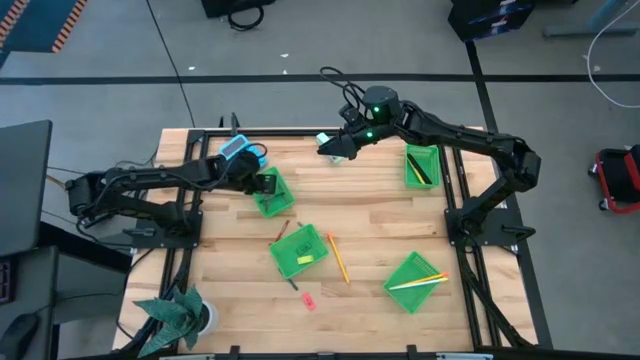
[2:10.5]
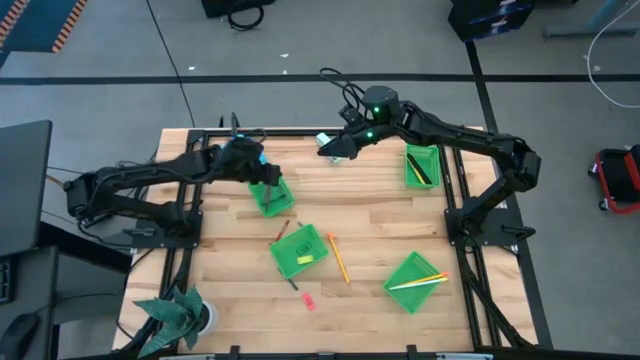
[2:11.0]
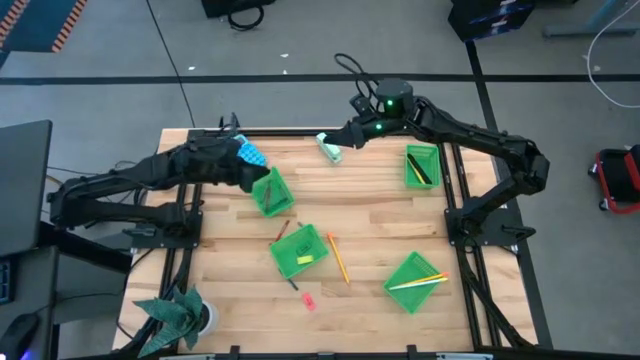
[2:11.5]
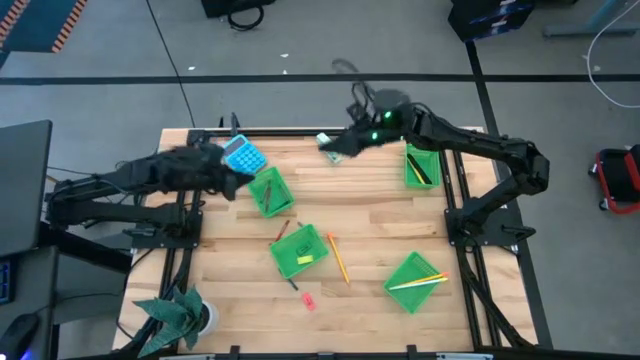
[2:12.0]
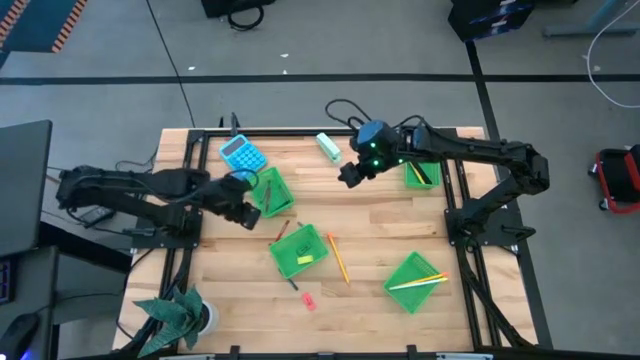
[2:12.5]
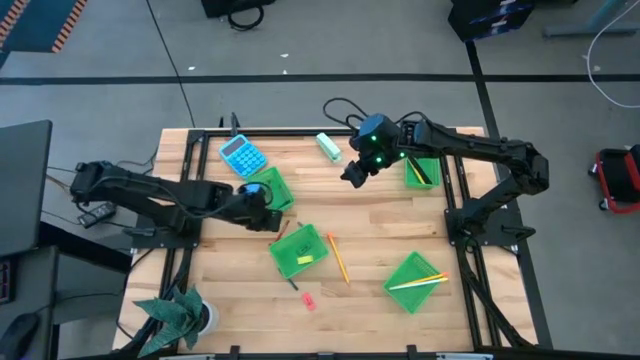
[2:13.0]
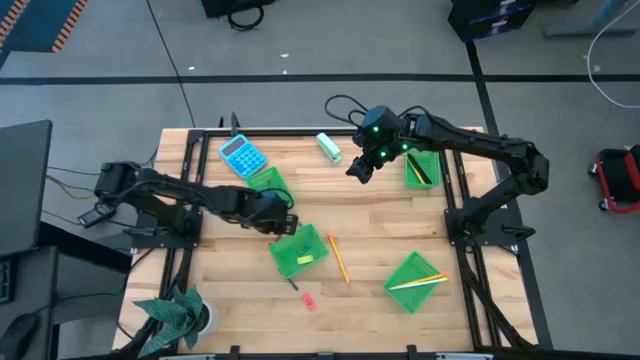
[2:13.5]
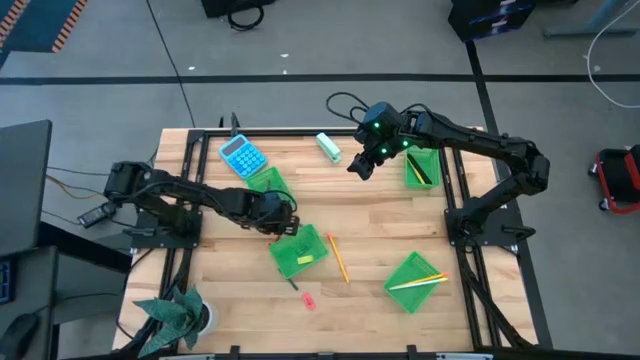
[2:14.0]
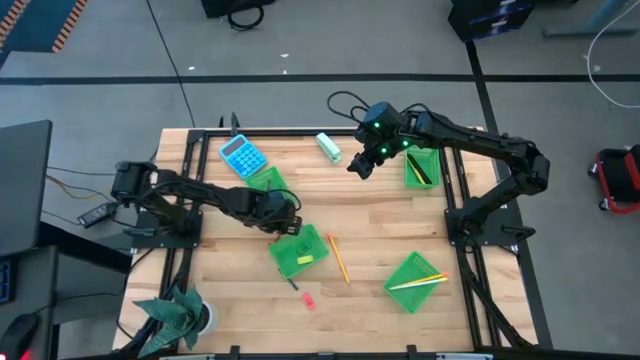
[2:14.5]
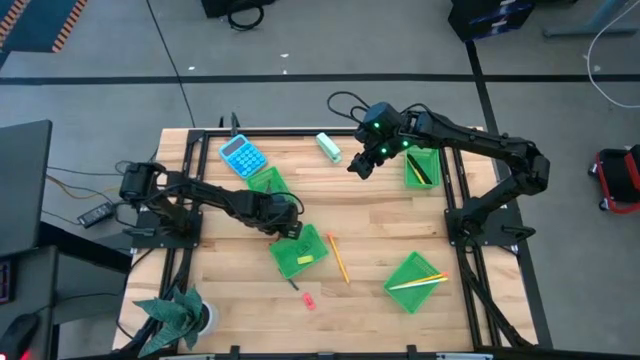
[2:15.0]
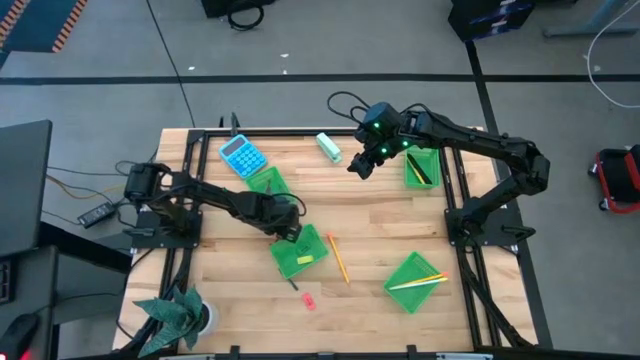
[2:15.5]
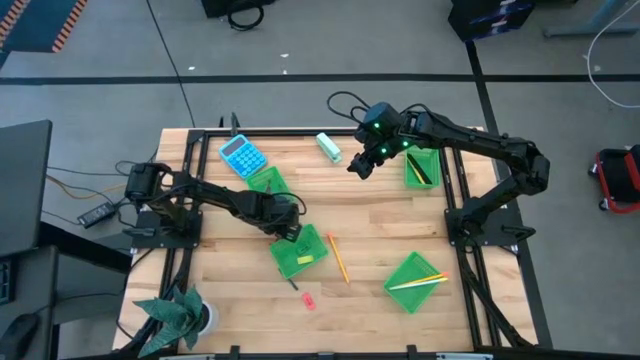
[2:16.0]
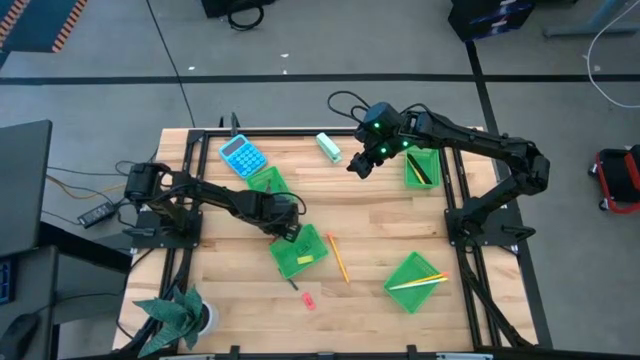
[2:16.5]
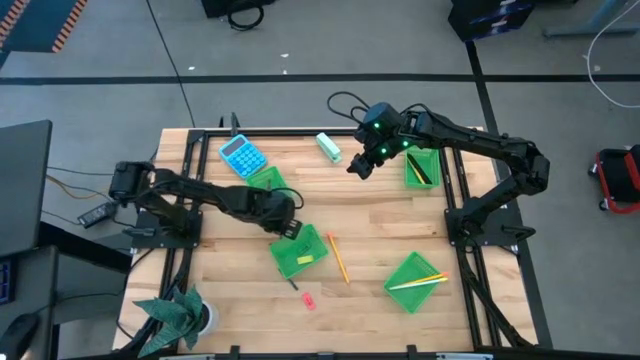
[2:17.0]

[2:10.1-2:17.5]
Task: Sort crayons/erasers/pens/pencils in bins
Put the top red crayon into the top left green bin

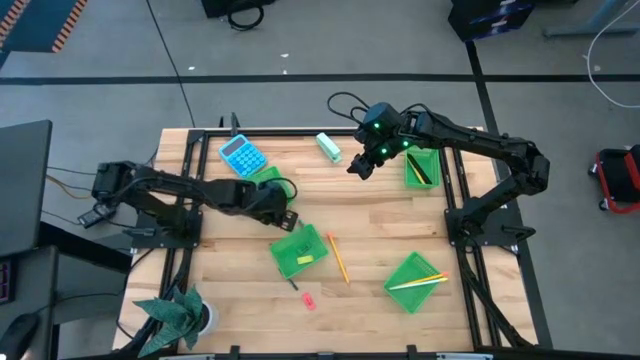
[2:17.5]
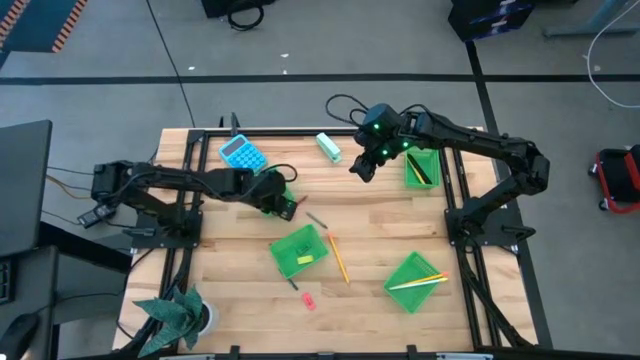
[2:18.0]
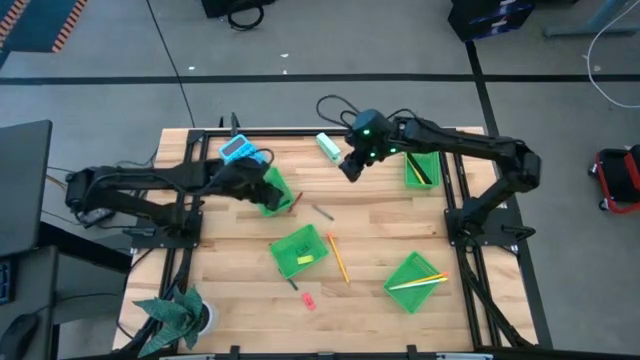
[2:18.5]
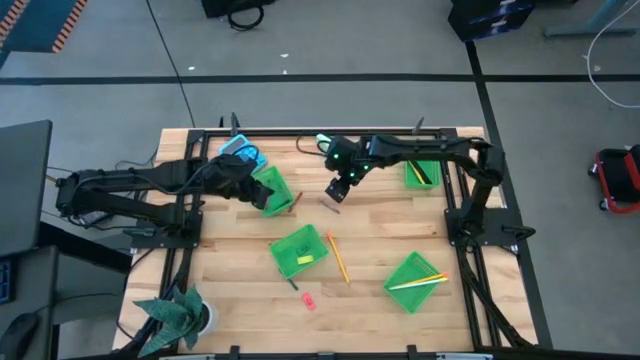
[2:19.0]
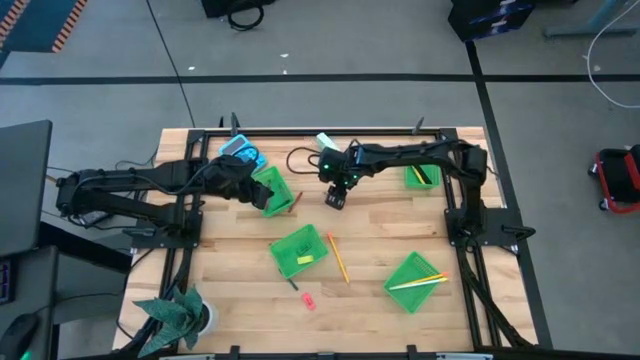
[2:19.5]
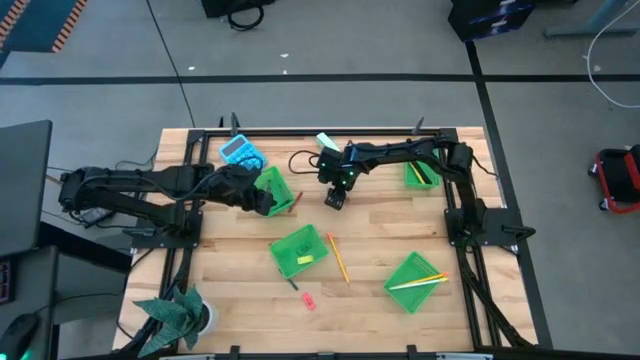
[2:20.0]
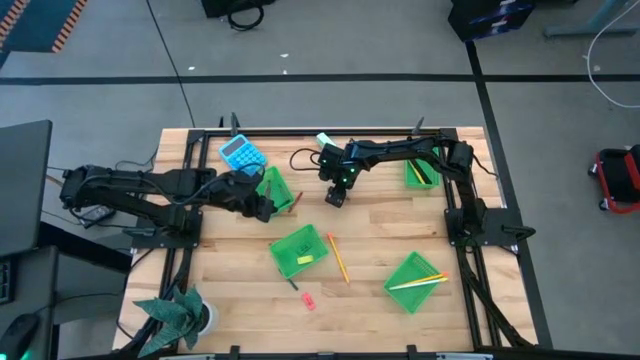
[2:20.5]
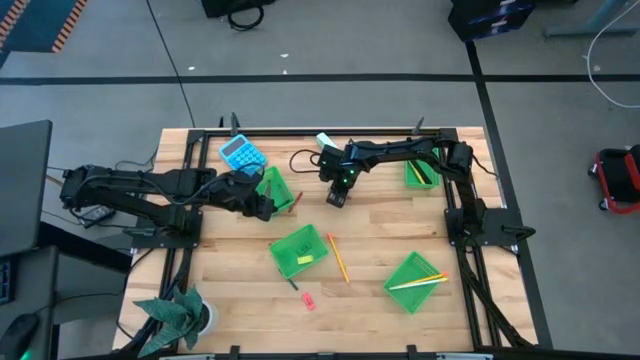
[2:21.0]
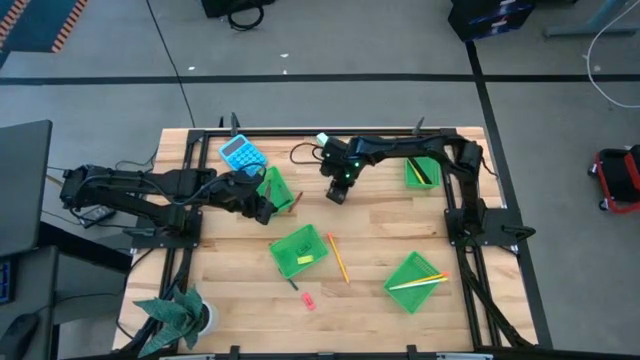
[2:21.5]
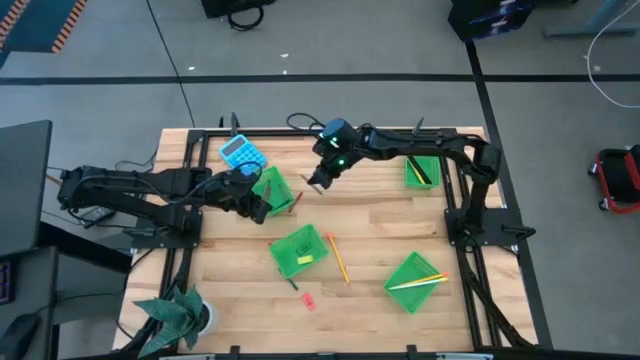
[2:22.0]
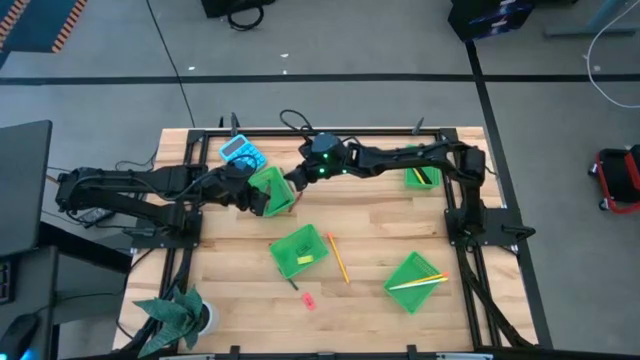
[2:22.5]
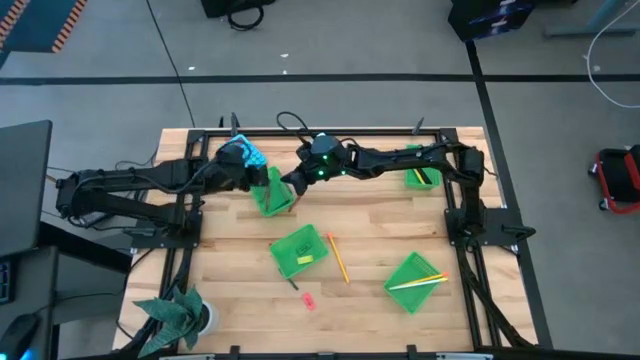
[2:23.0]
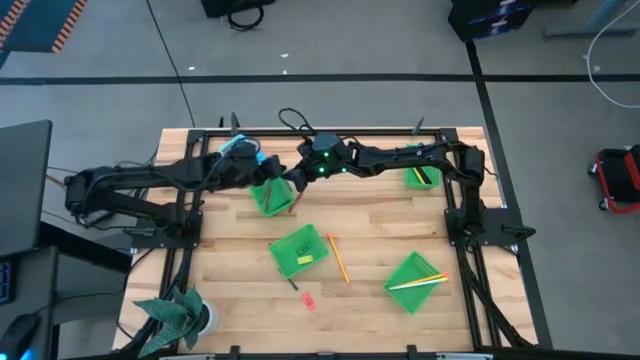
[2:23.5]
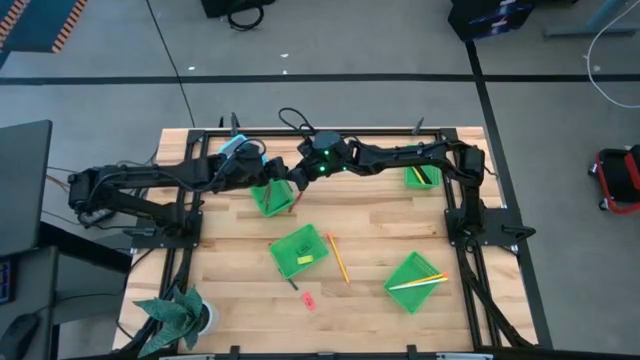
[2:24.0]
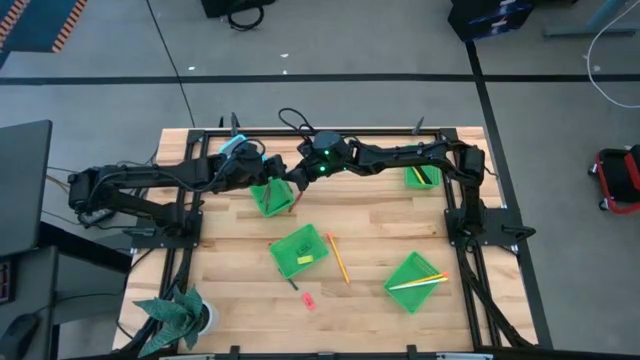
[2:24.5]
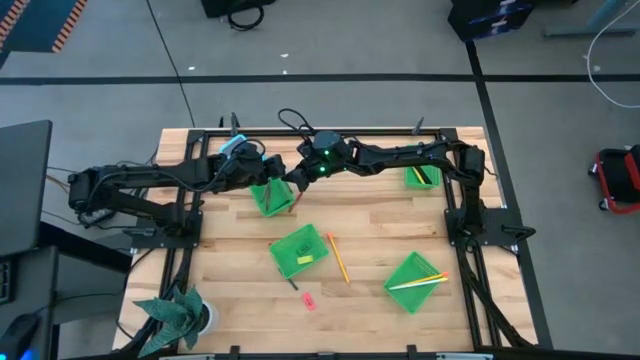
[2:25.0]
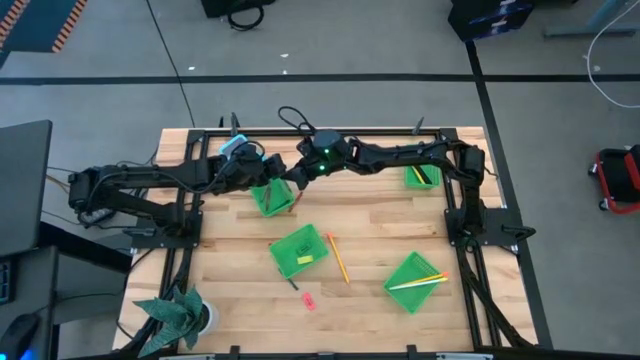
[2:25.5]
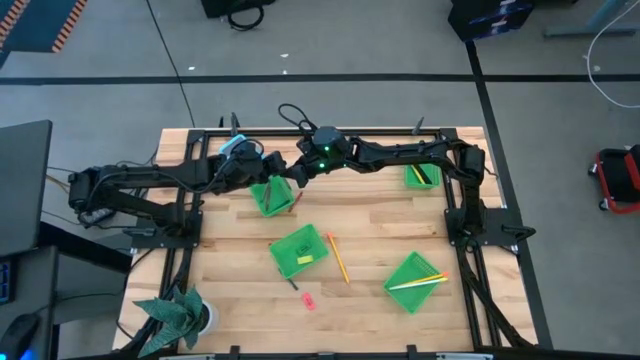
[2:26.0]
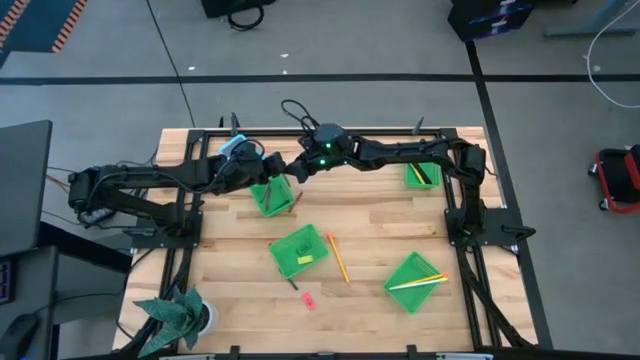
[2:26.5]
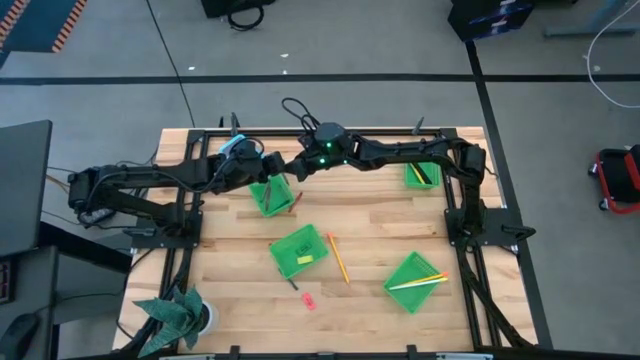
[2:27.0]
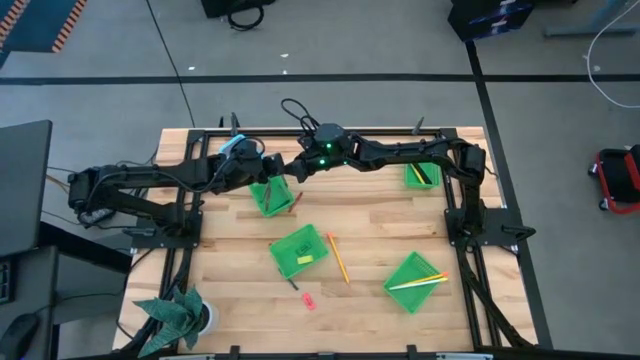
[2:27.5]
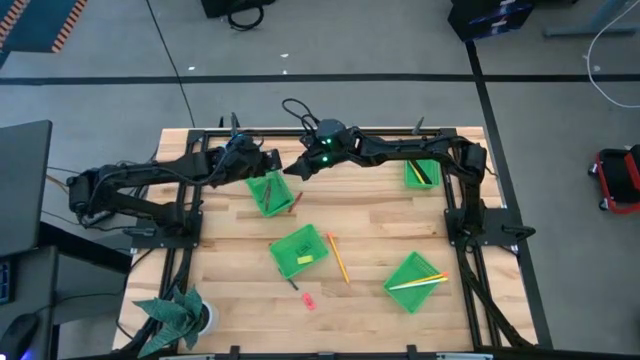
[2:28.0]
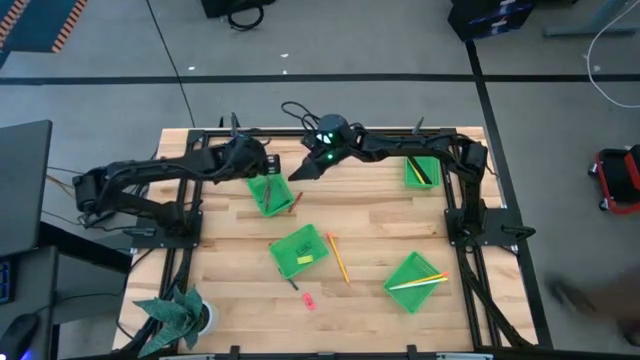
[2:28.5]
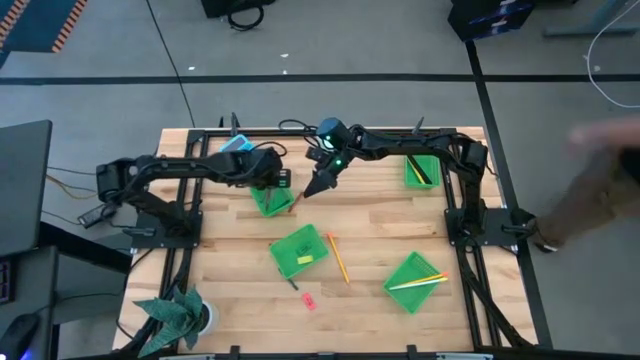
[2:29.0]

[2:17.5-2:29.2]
Put the gray crayon into the top left green bin

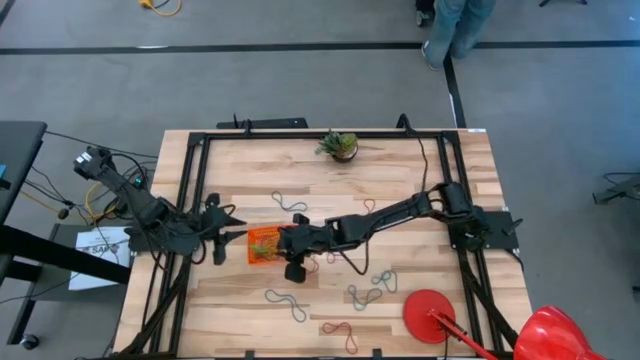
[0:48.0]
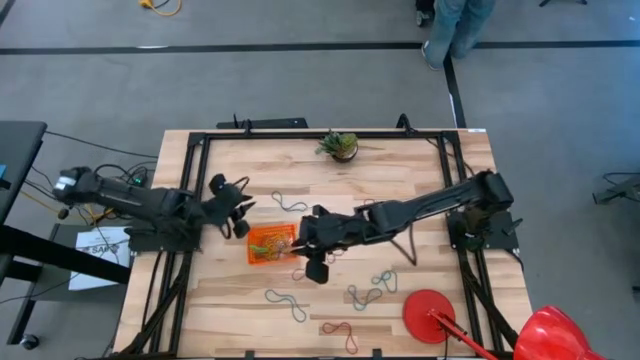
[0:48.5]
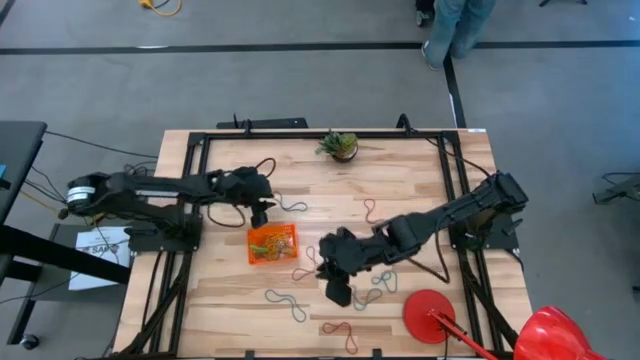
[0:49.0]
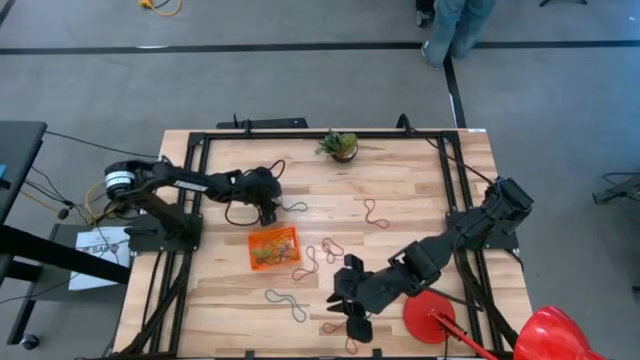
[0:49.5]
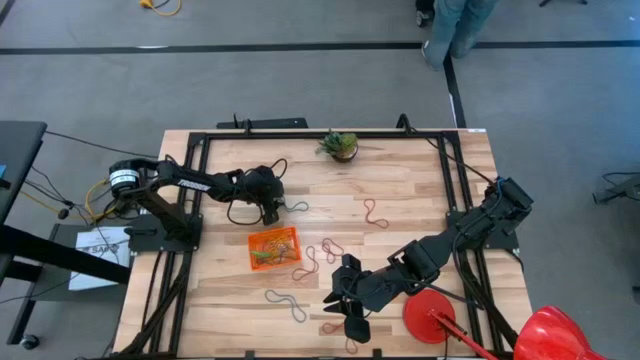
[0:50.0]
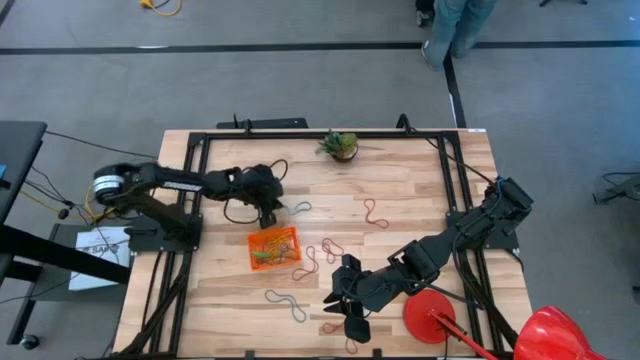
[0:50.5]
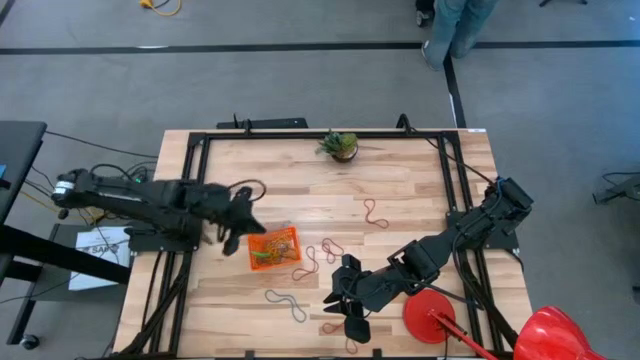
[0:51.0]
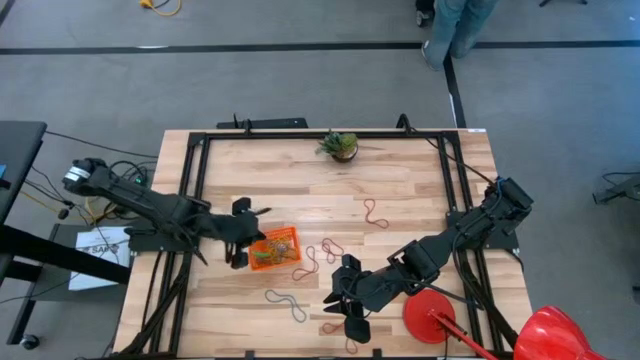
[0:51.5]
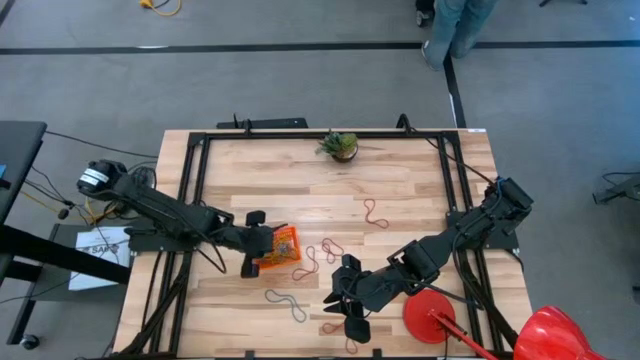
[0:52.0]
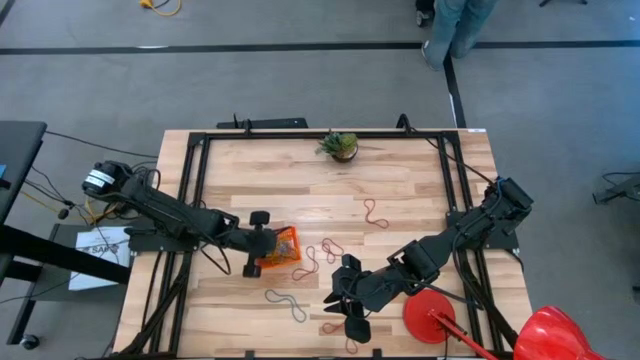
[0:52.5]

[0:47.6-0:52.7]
Task: Pick and place rubber bands into bin
Put the blue rubber band into the orange container
